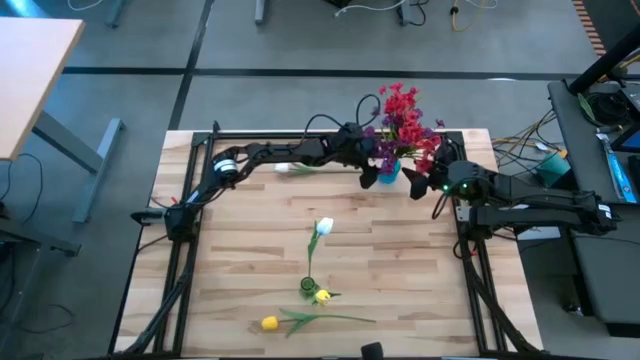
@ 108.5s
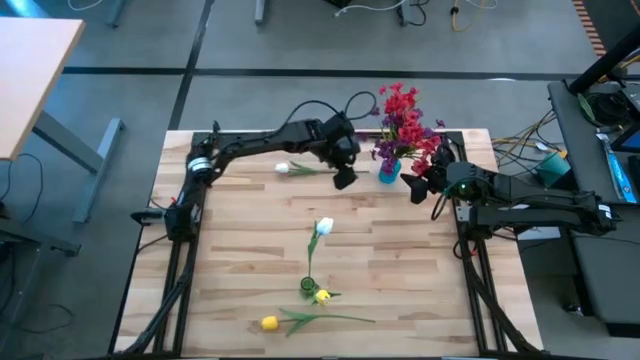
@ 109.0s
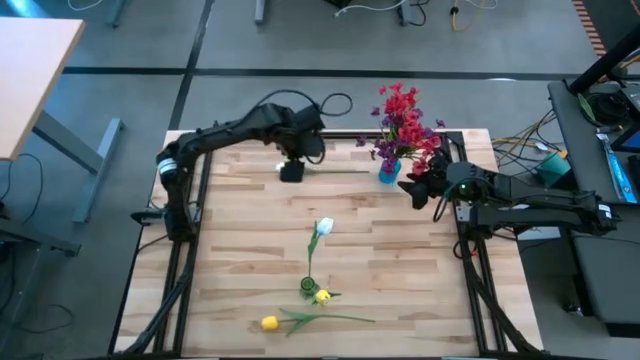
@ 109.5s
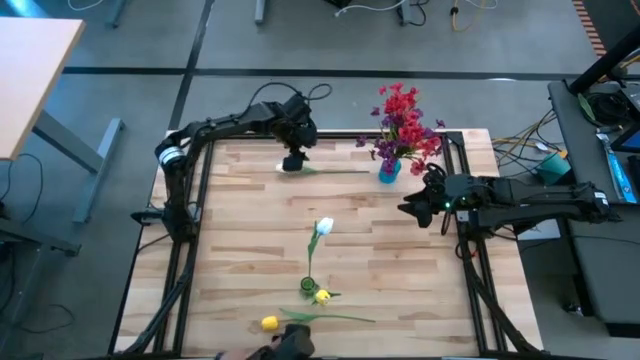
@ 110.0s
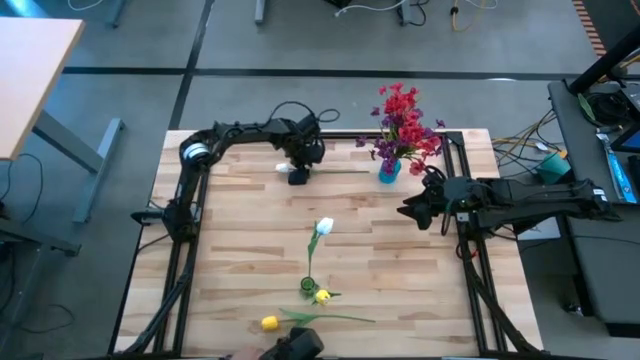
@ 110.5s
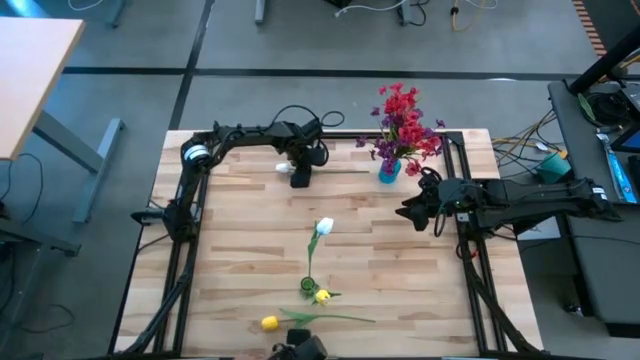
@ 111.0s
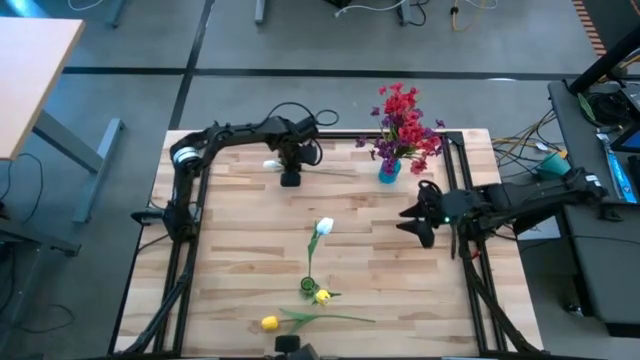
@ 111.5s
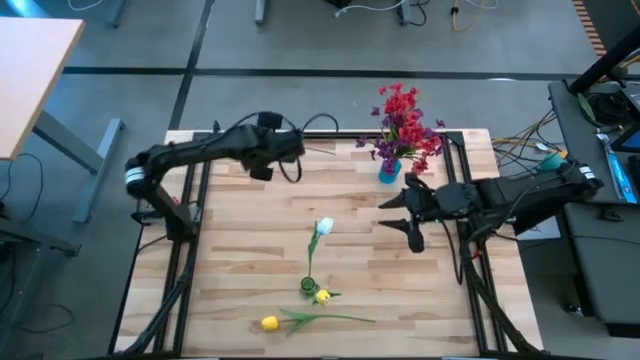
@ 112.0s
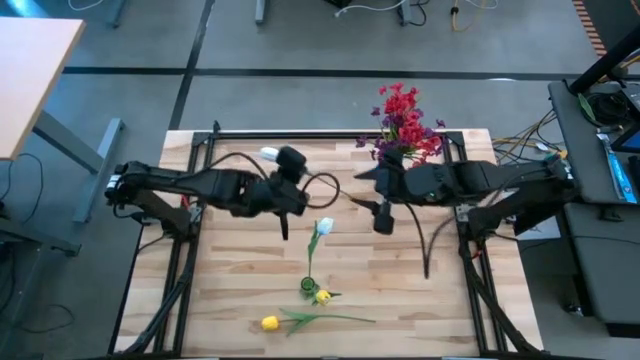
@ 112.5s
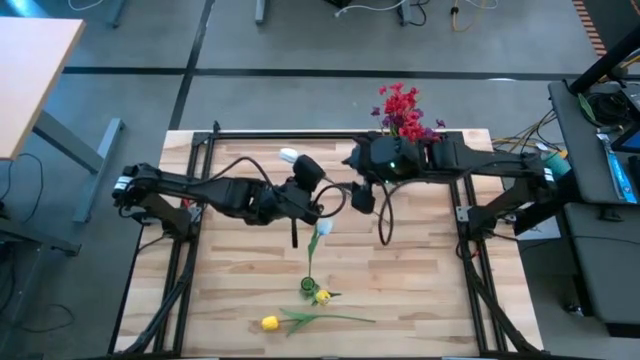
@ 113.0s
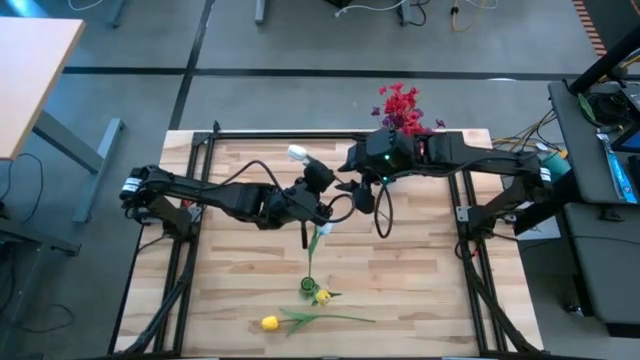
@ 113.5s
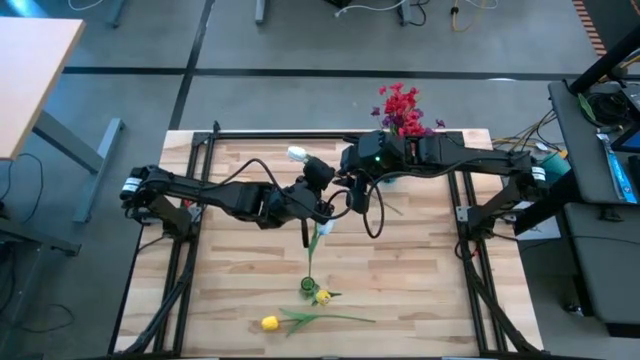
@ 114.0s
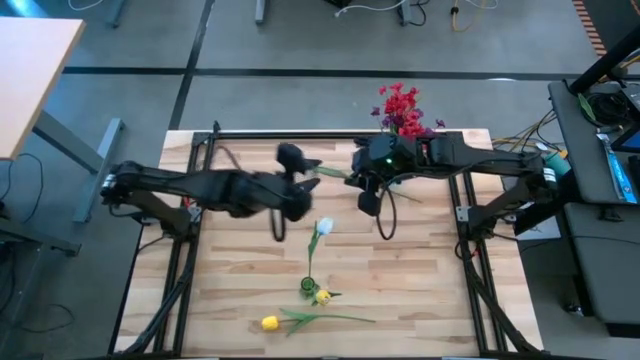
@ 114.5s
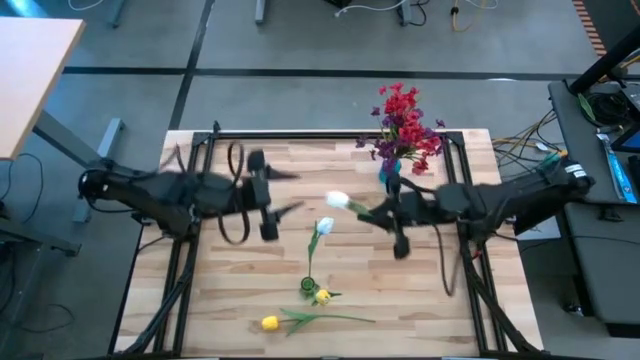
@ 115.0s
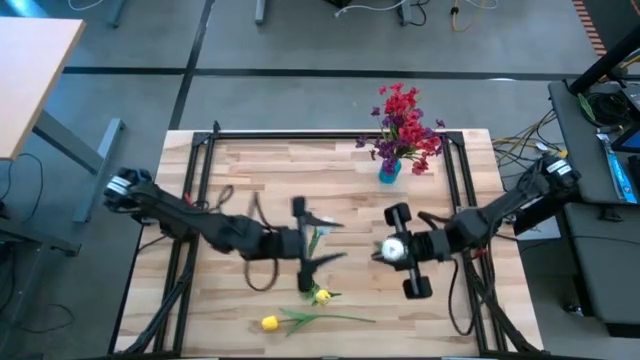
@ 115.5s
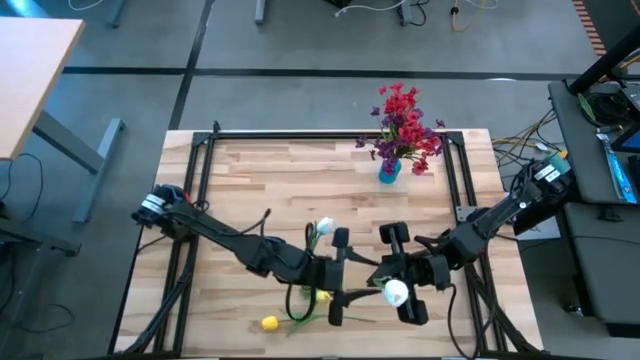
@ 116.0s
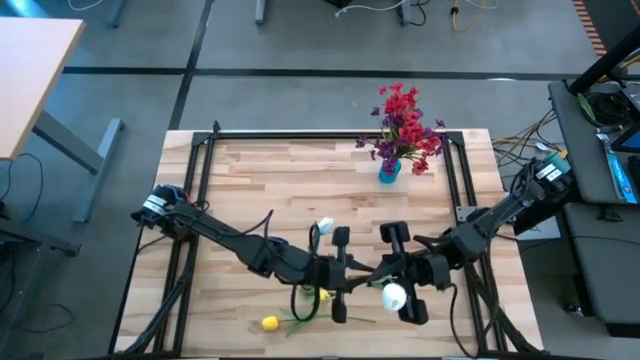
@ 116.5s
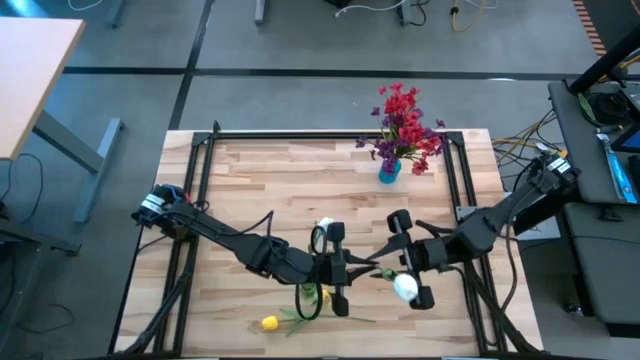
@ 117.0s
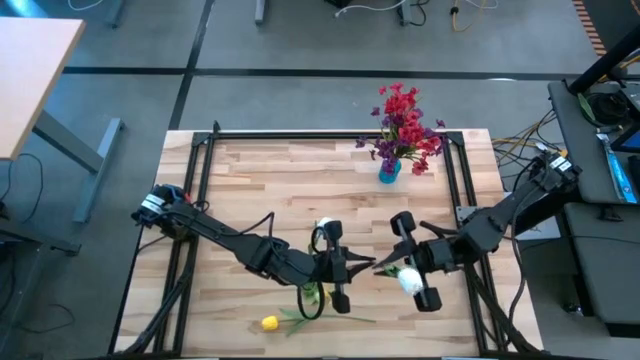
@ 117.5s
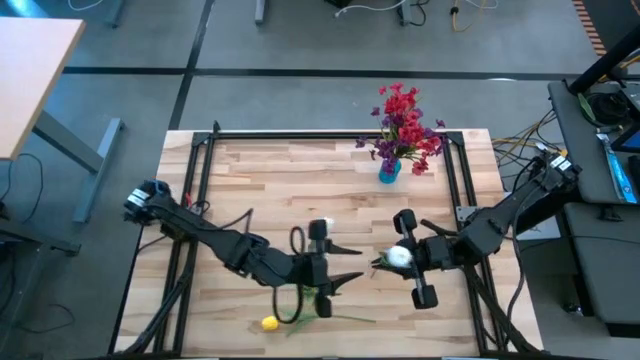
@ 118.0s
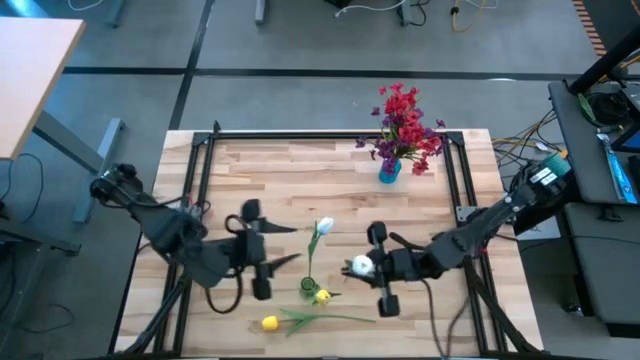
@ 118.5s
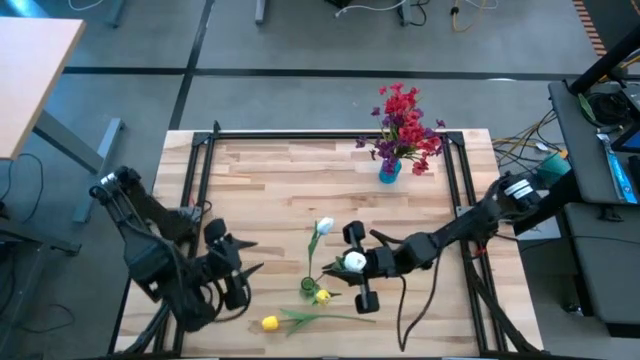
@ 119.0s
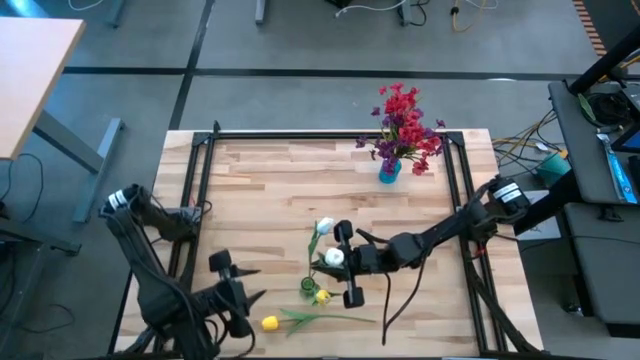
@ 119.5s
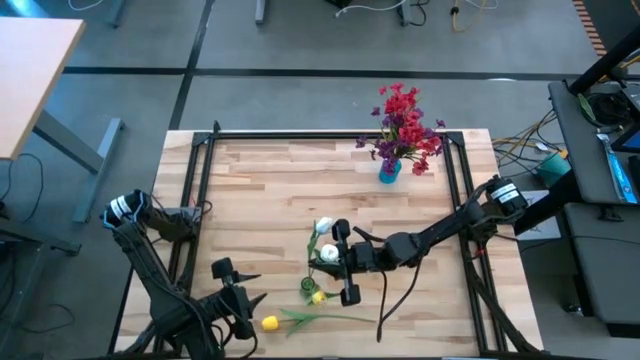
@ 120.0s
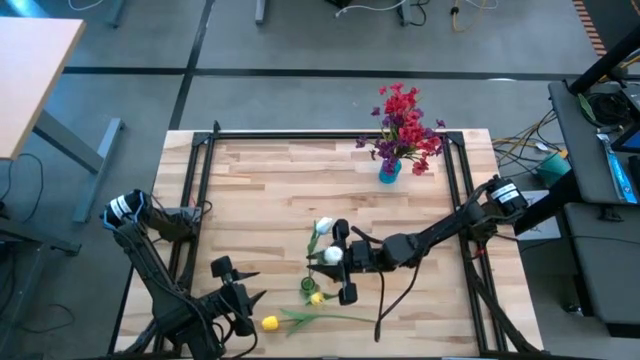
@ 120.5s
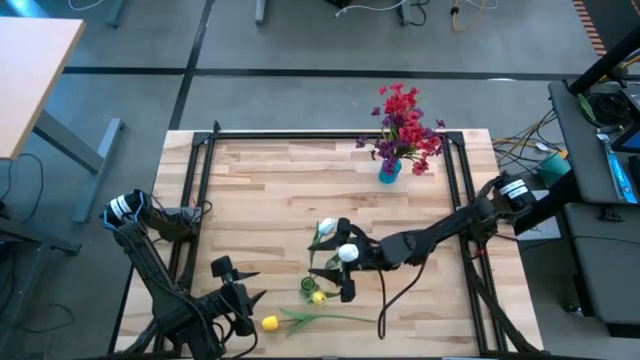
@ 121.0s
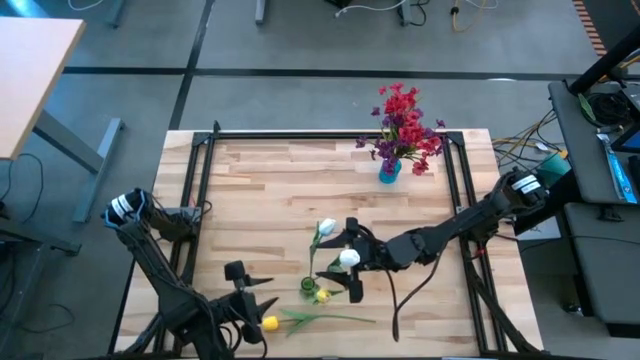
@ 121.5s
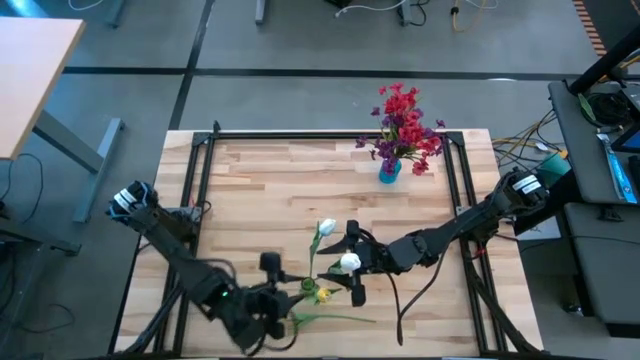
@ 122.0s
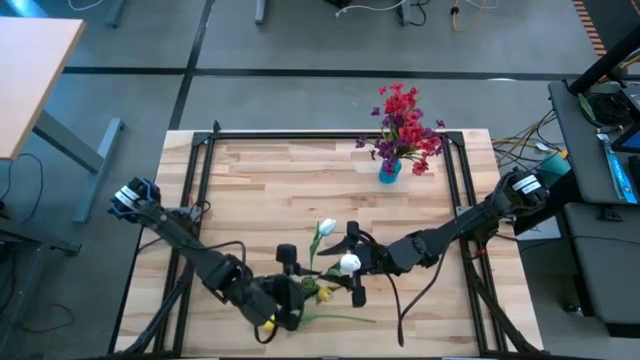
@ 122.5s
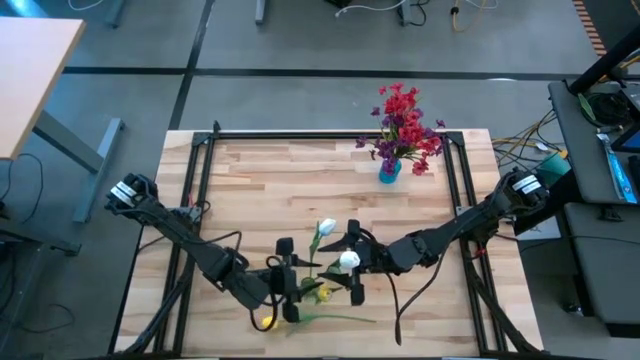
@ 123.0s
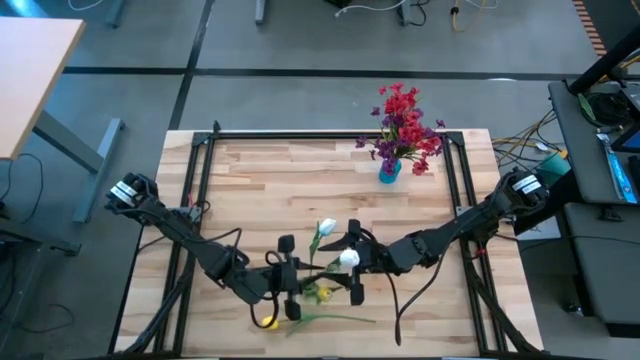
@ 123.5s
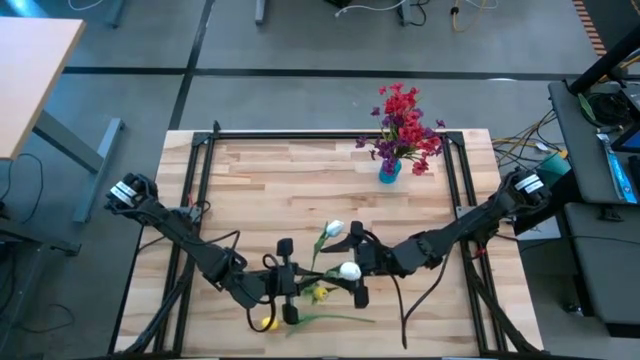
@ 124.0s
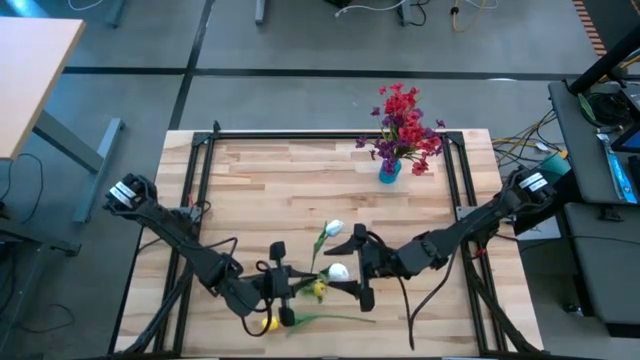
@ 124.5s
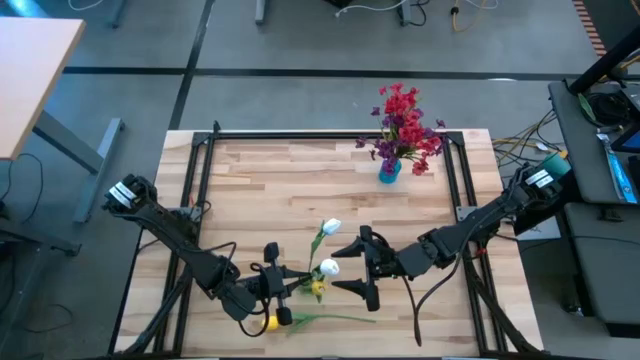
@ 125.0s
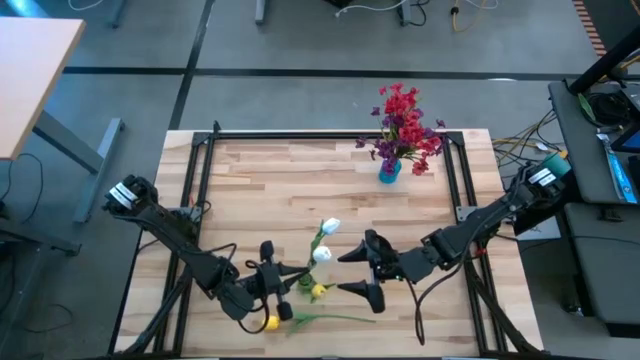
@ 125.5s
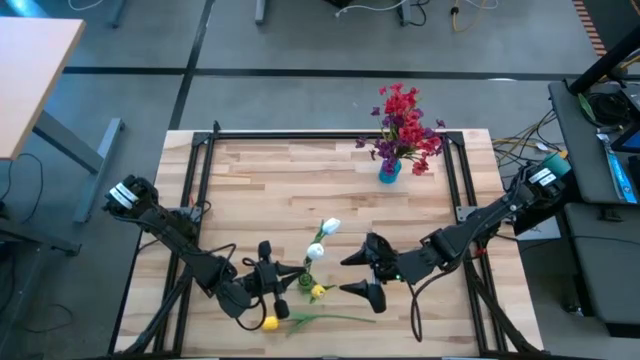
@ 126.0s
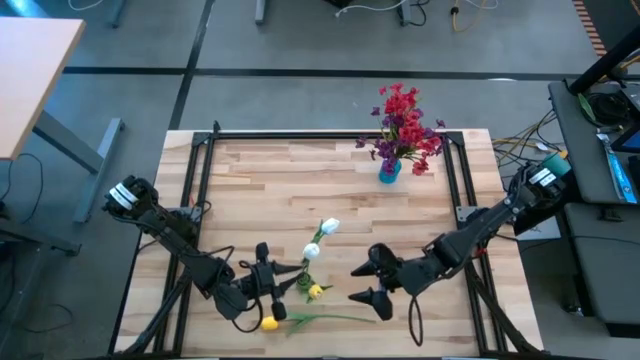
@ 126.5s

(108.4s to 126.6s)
Task: Sort flowers into vase by color
Put the white flower into the green vase

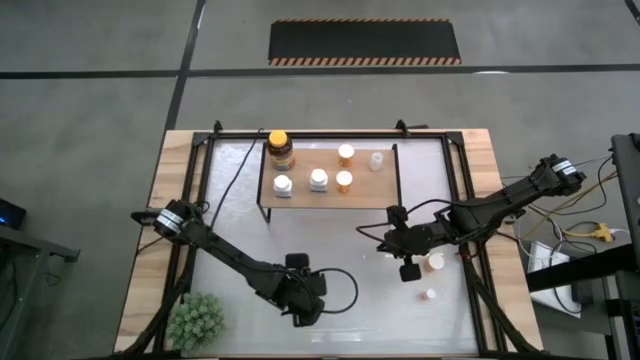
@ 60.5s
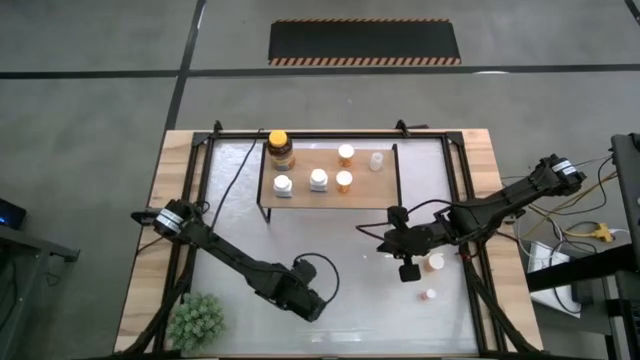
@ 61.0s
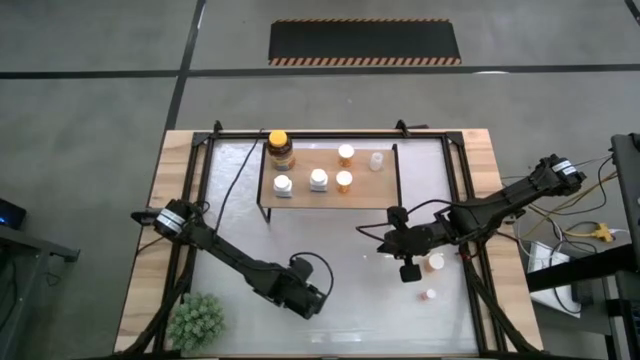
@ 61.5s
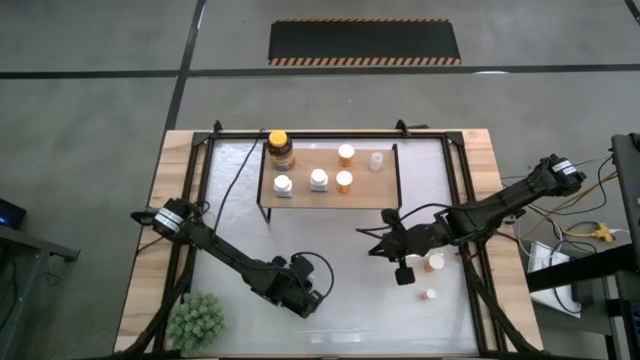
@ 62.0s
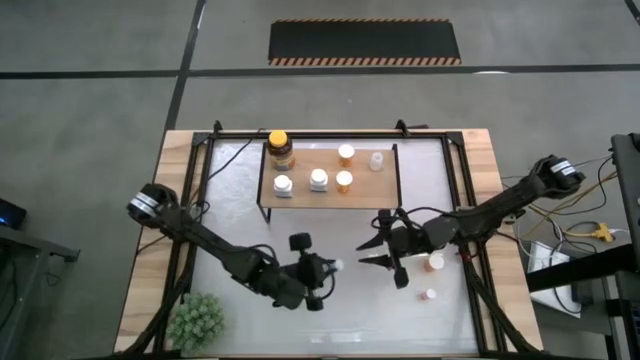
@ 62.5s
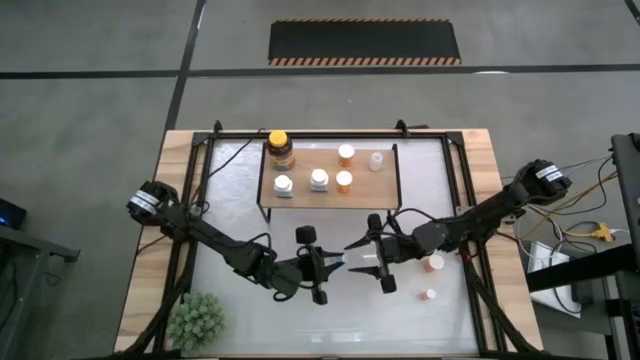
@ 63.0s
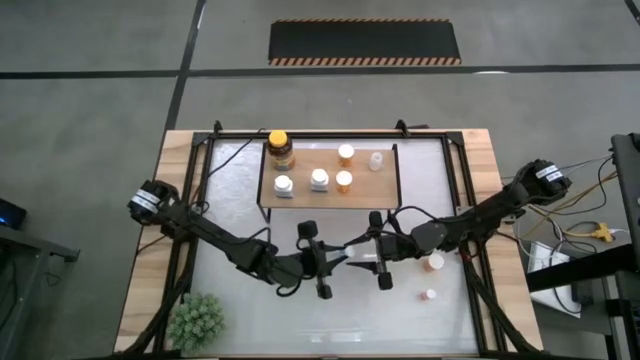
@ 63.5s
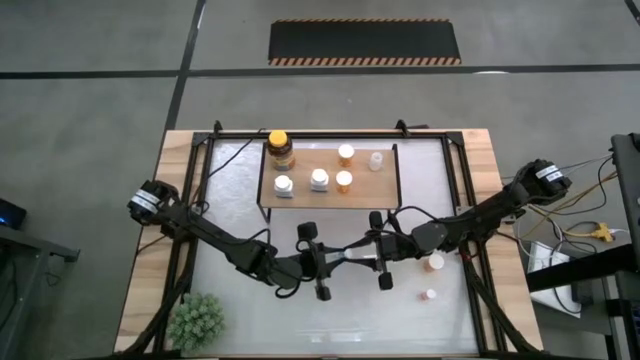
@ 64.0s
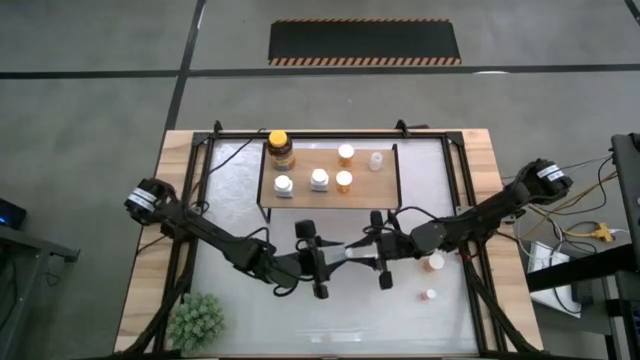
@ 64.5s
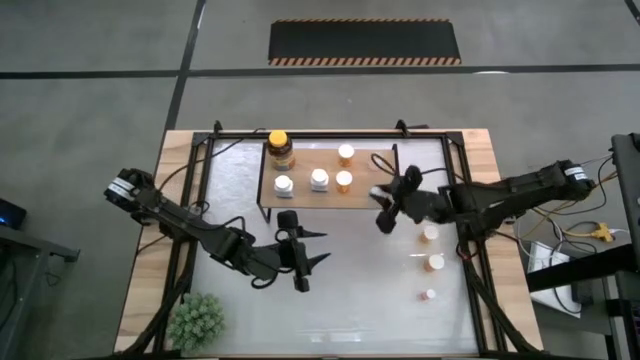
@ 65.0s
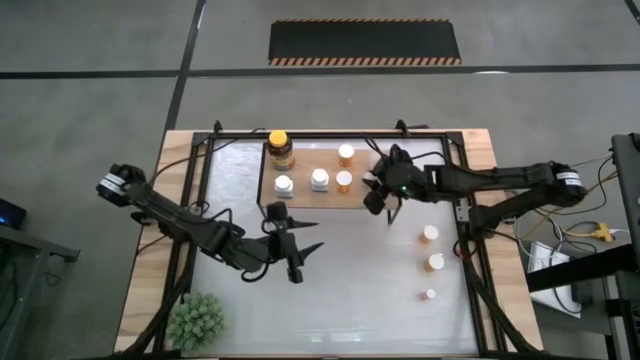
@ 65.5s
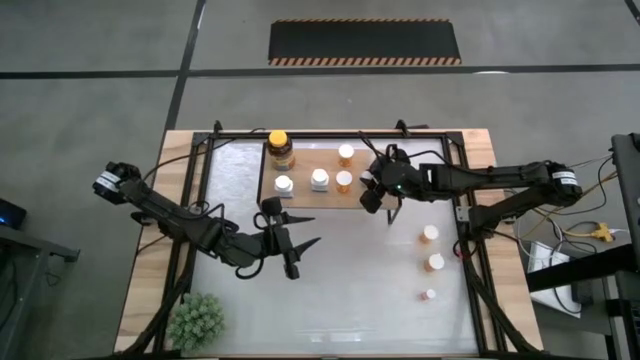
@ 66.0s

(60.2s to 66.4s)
Task: Pick and place medicine bottles onto shelf by color
Put the blue pill bottle on the shelf
